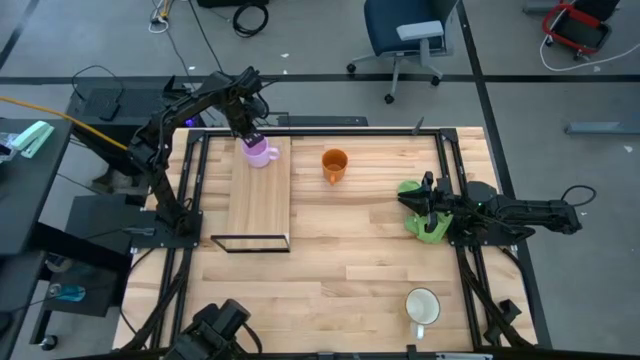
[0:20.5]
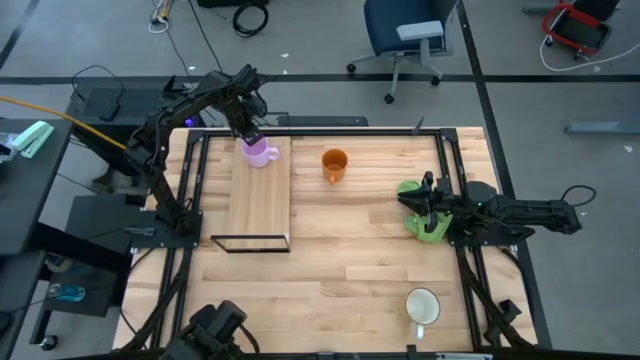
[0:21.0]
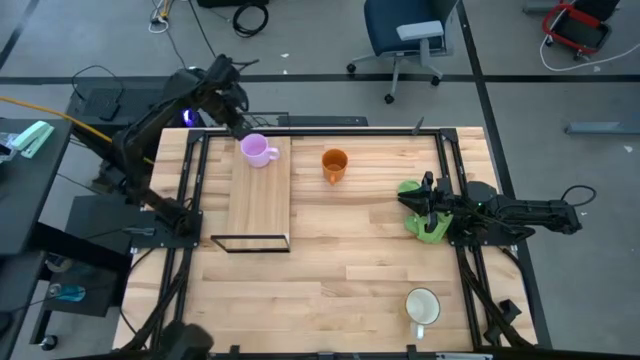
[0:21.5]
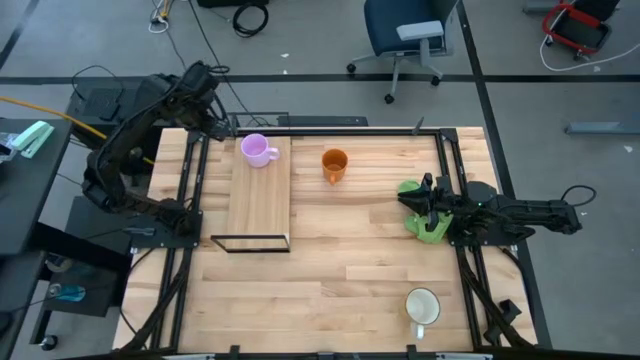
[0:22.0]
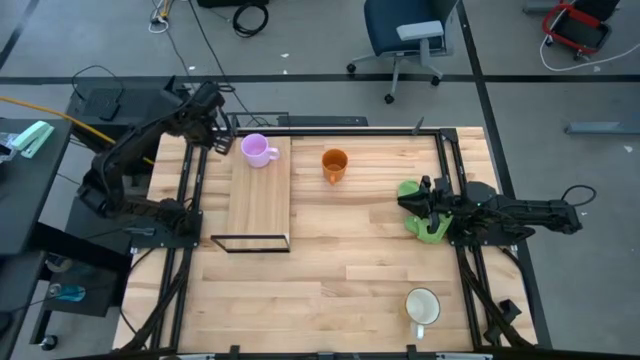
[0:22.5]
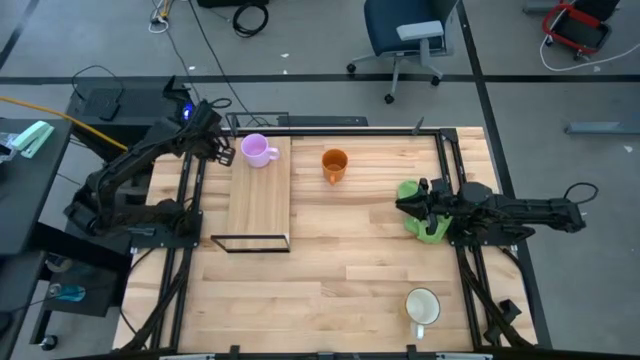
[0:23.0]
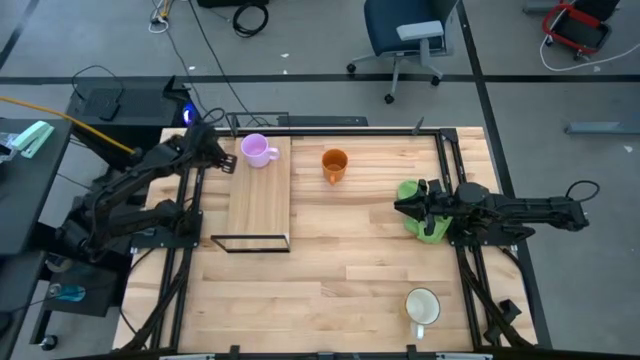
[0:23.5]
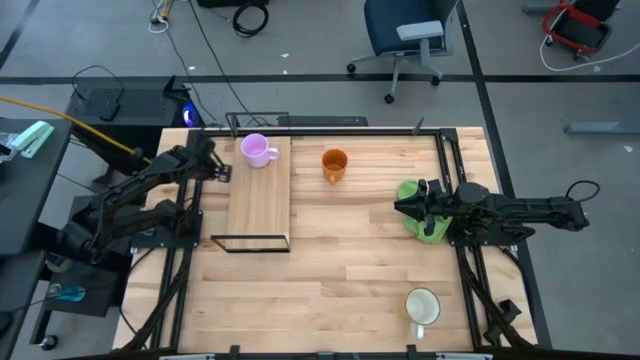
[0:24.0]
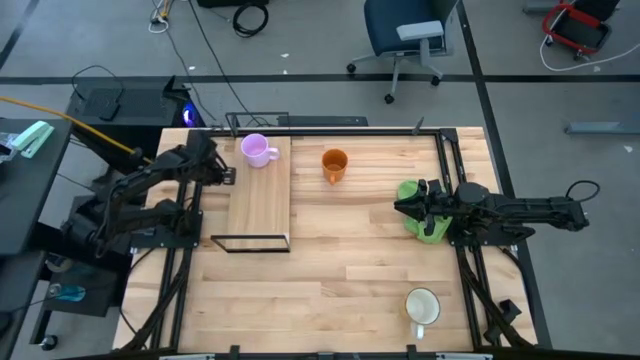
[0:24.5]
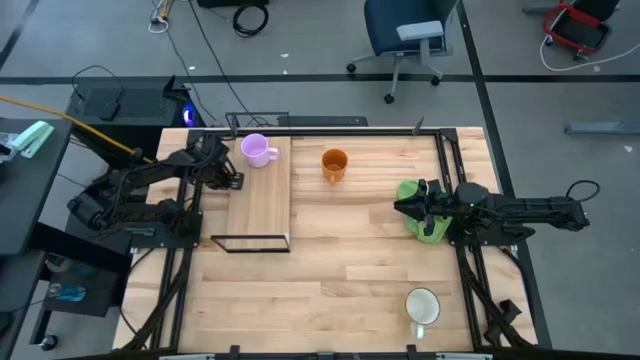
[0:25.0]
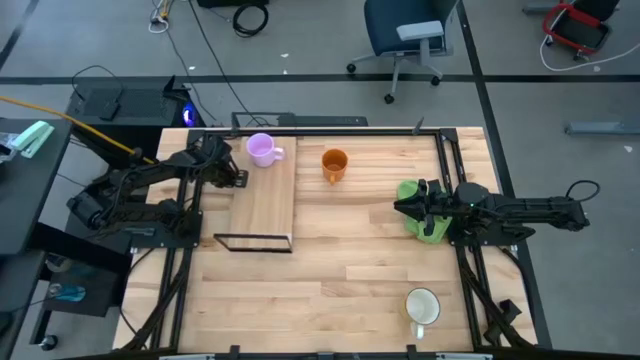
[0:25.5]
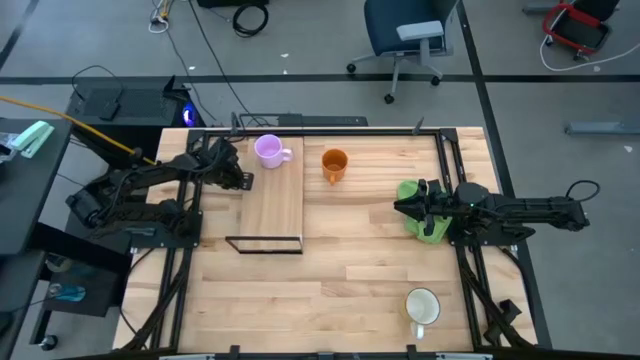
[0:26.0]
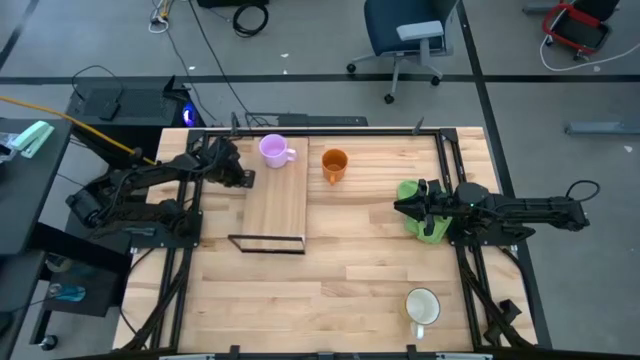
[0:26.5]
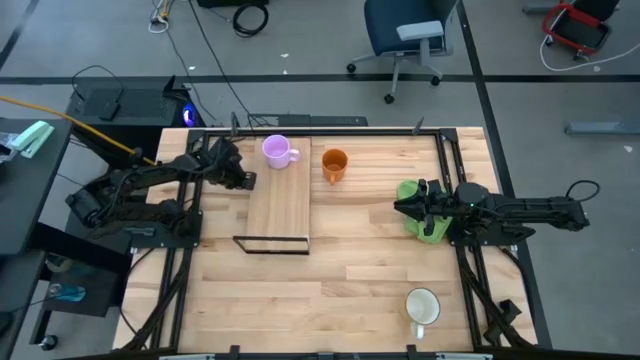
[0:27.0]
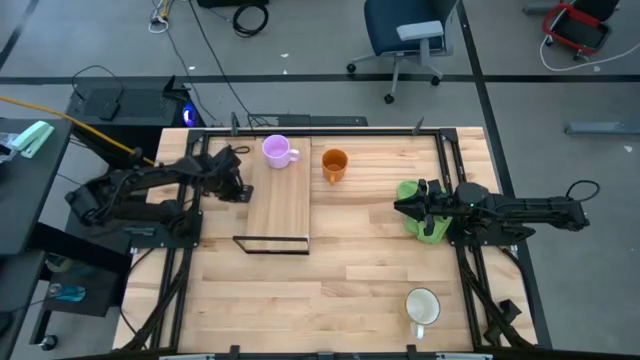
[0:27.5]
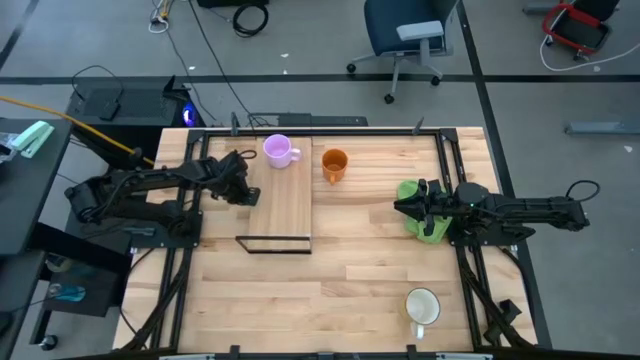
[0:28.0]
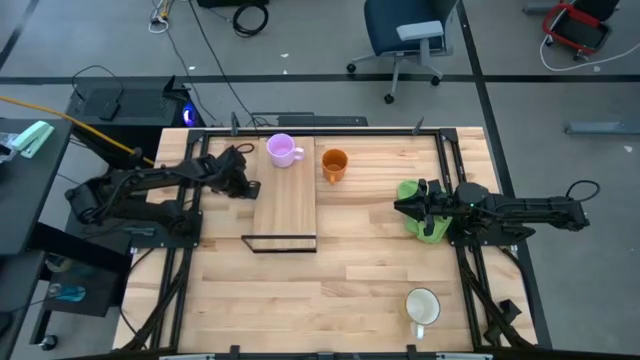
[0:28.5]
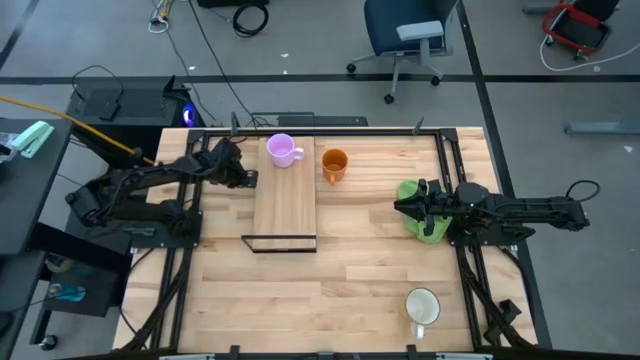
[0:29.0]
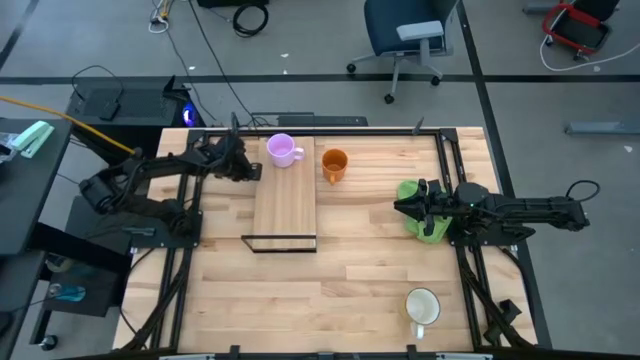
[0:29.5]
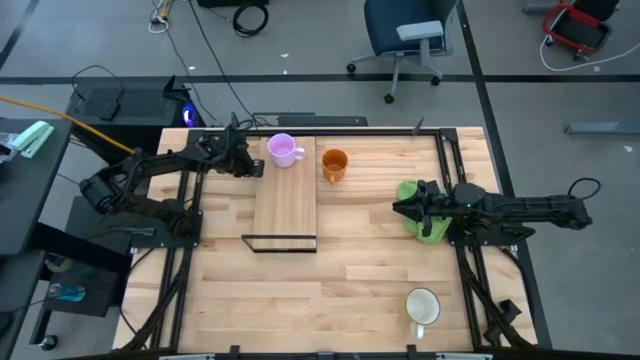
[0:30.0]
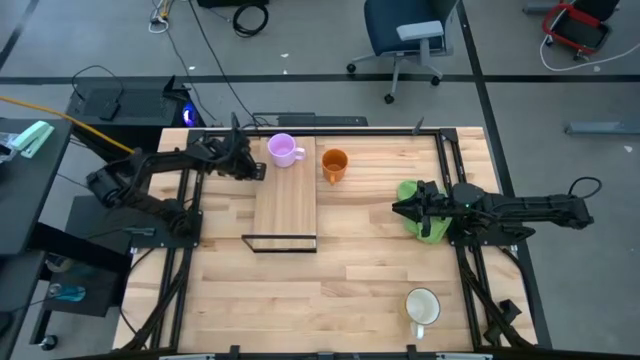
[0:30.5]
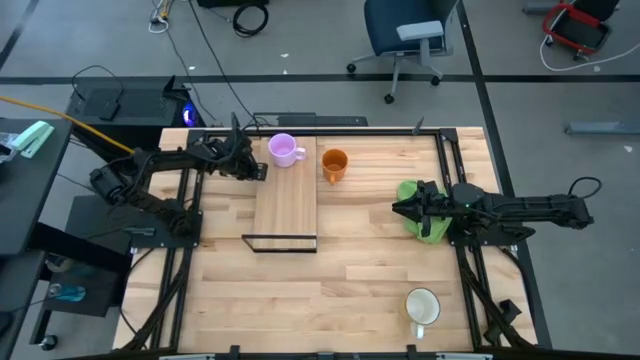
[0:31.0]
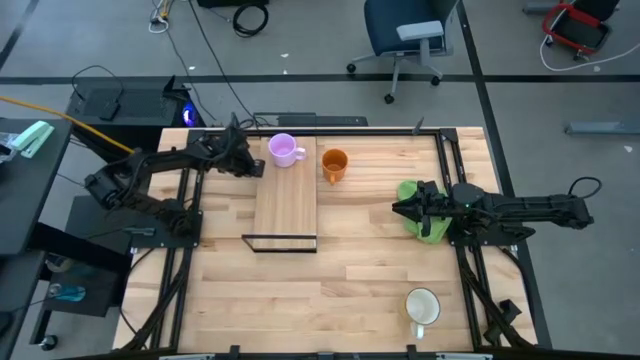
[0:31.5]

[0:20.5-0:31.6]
Task: Stack small to large cups/mugs on shelf
Adjust the shelf

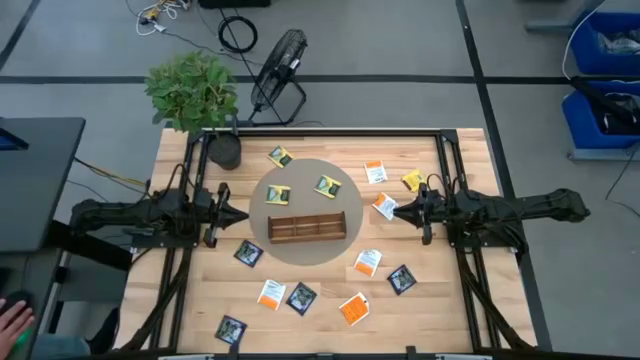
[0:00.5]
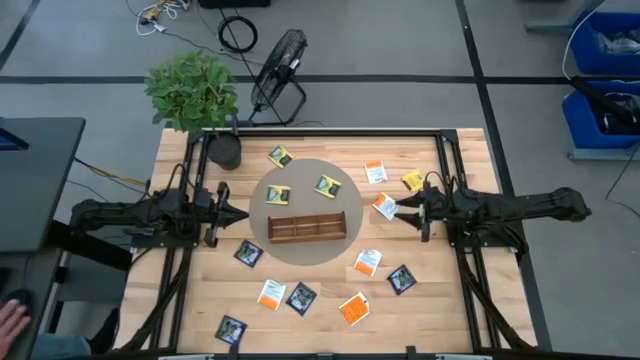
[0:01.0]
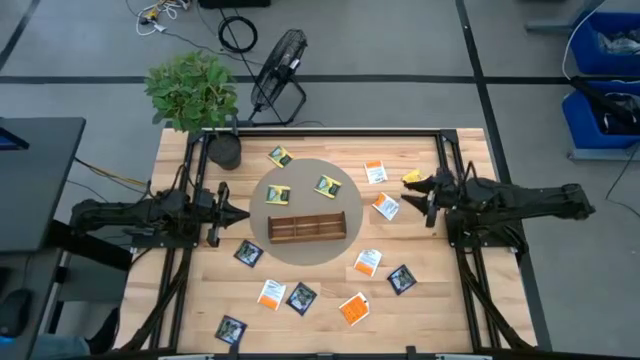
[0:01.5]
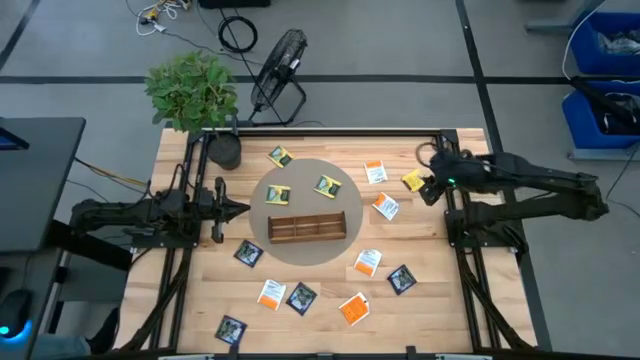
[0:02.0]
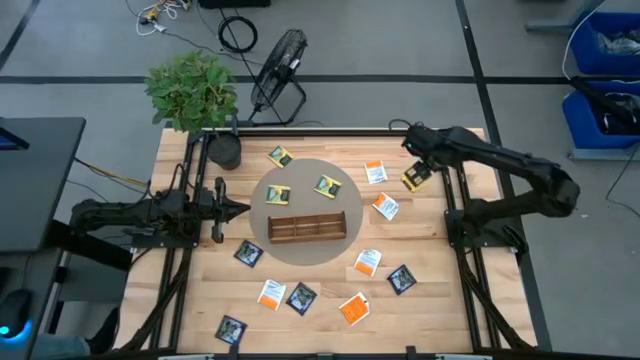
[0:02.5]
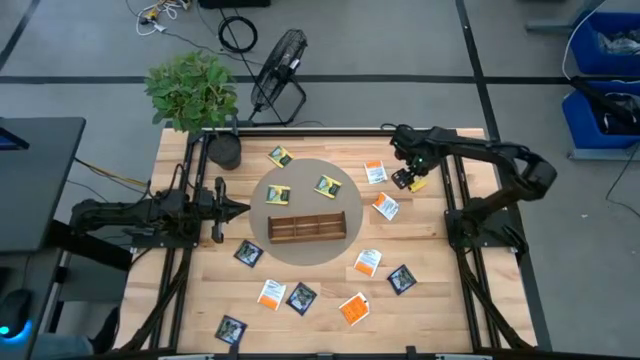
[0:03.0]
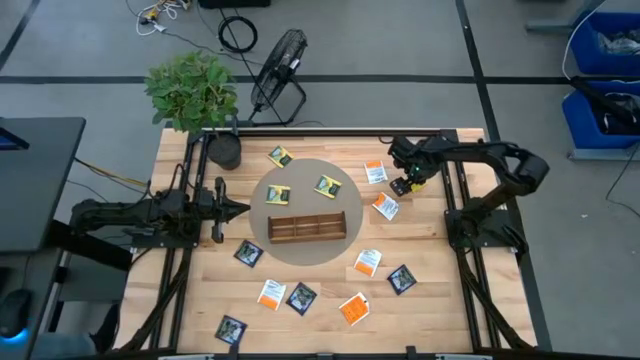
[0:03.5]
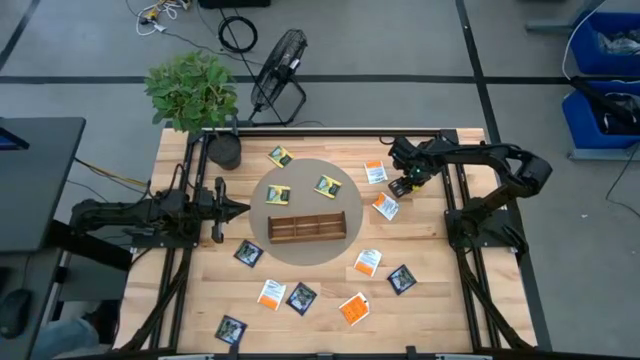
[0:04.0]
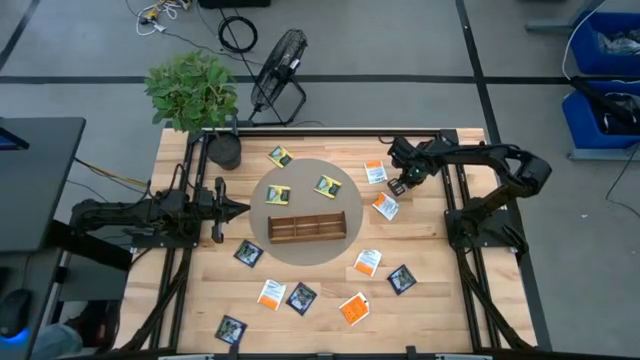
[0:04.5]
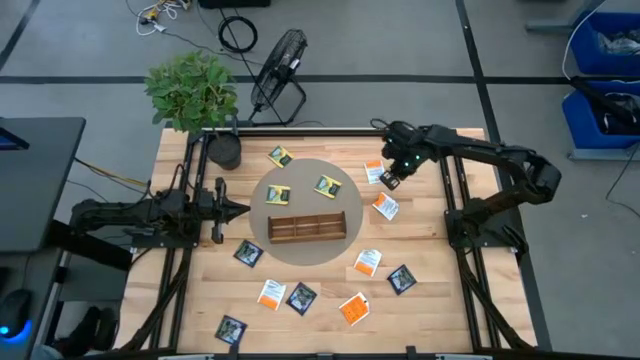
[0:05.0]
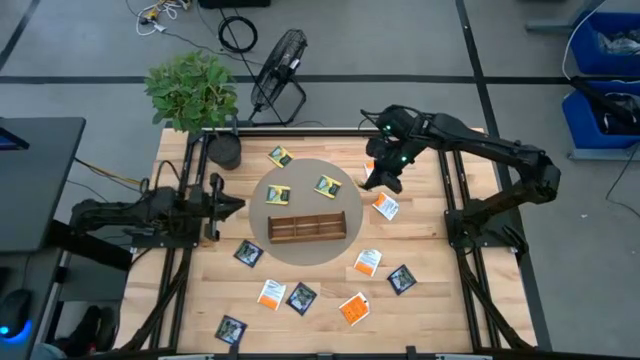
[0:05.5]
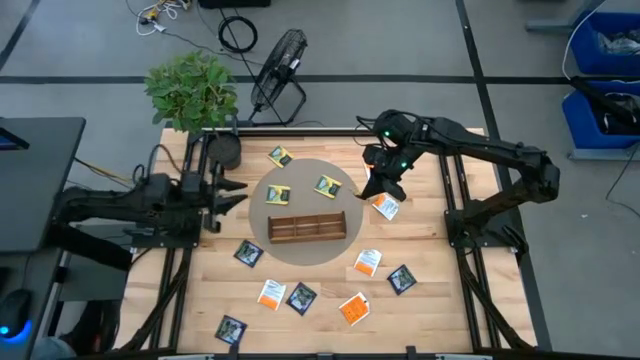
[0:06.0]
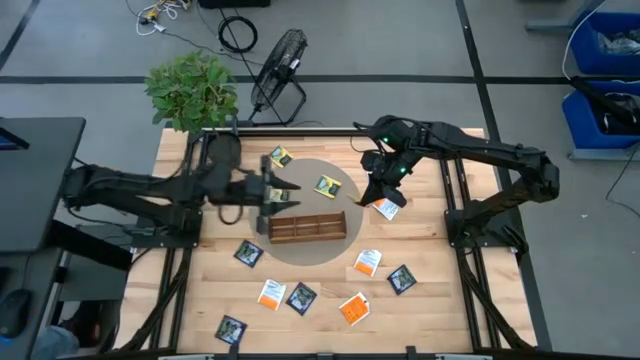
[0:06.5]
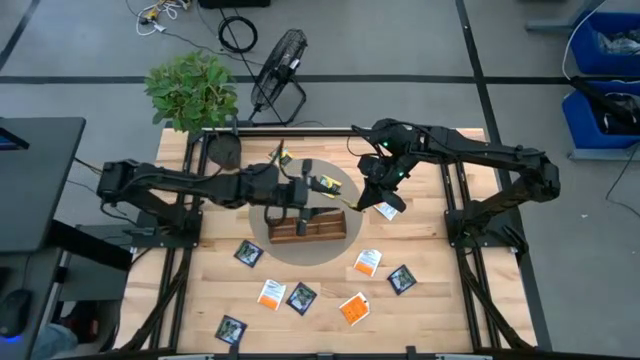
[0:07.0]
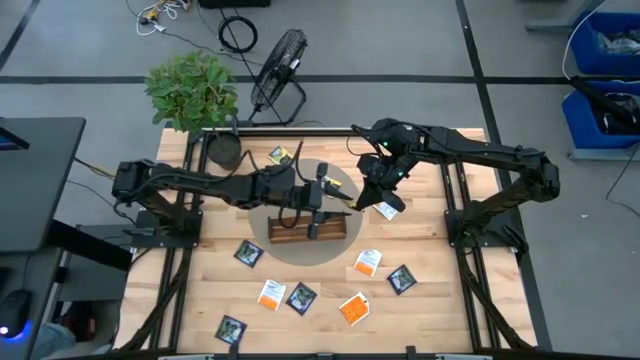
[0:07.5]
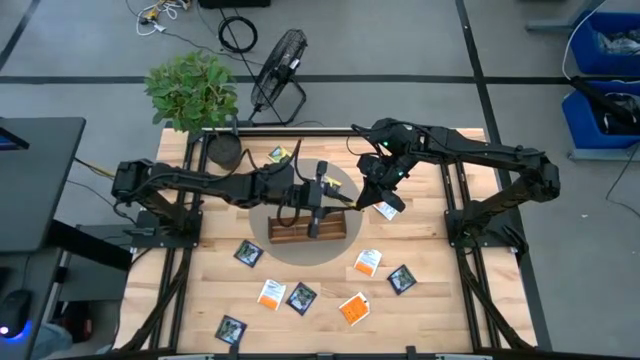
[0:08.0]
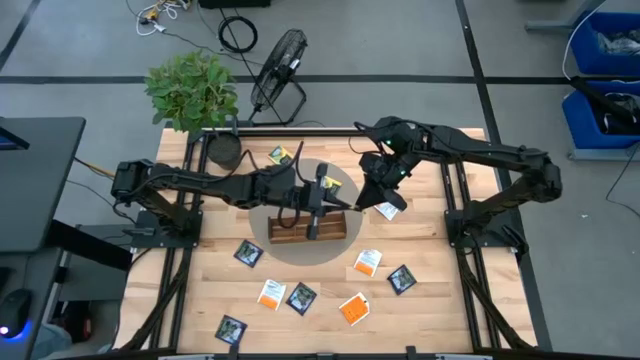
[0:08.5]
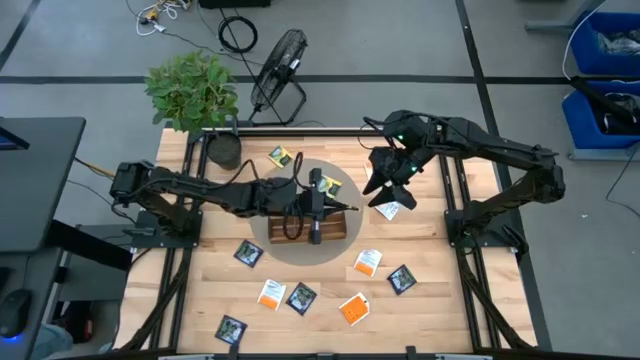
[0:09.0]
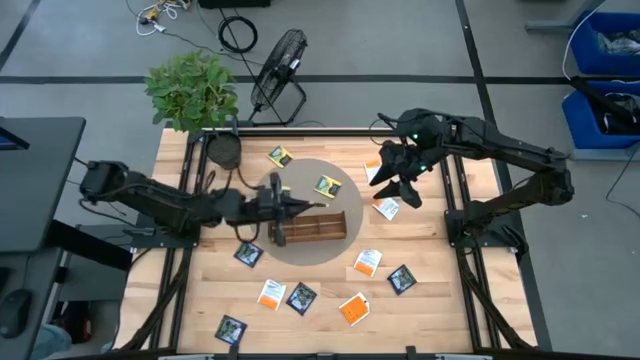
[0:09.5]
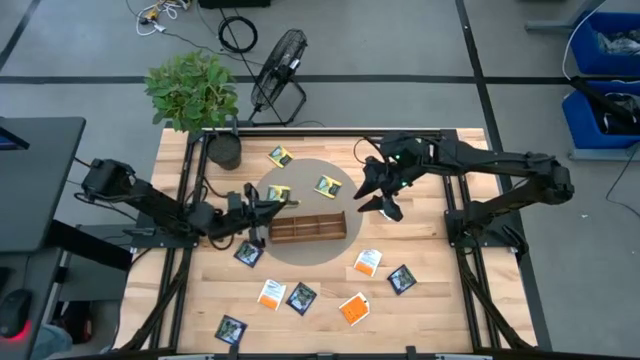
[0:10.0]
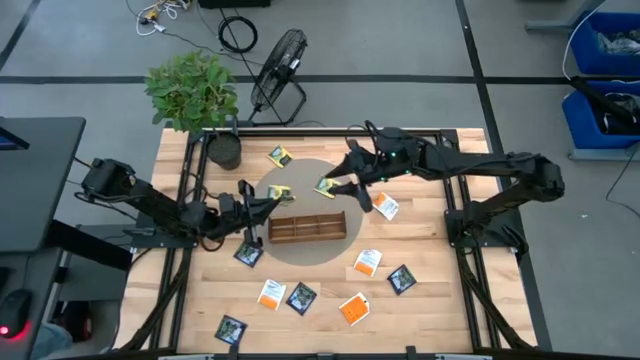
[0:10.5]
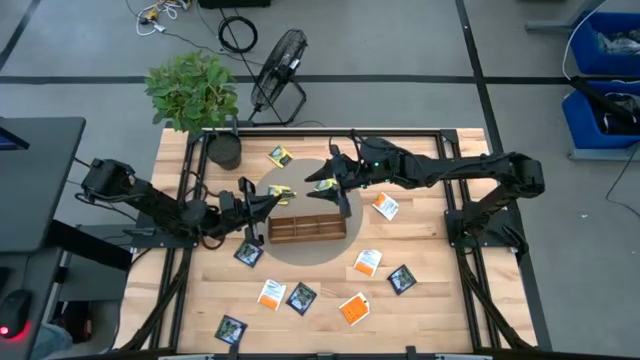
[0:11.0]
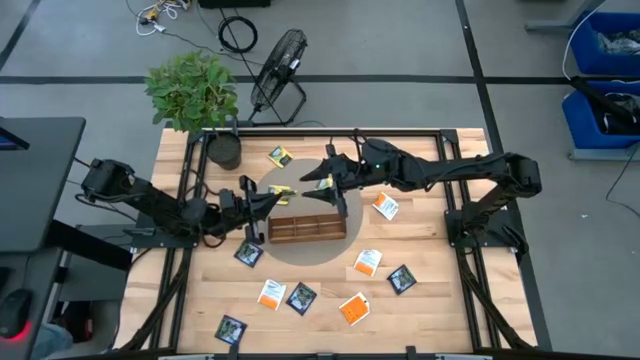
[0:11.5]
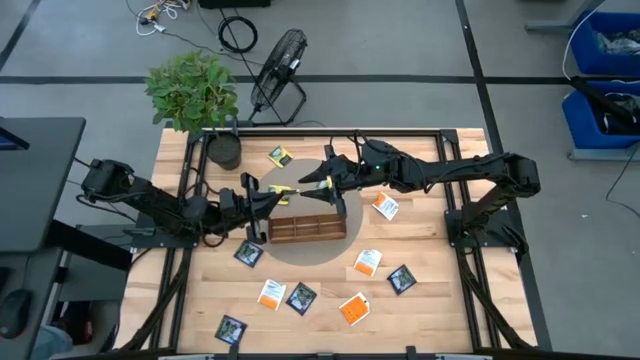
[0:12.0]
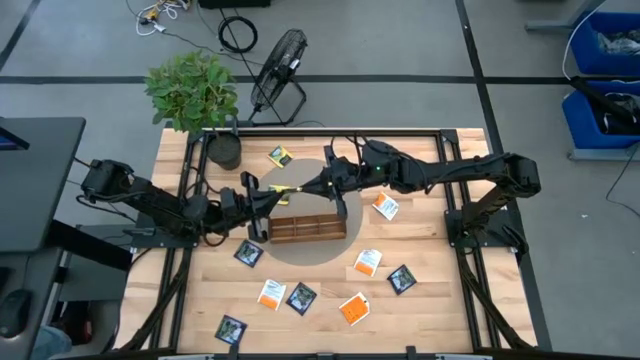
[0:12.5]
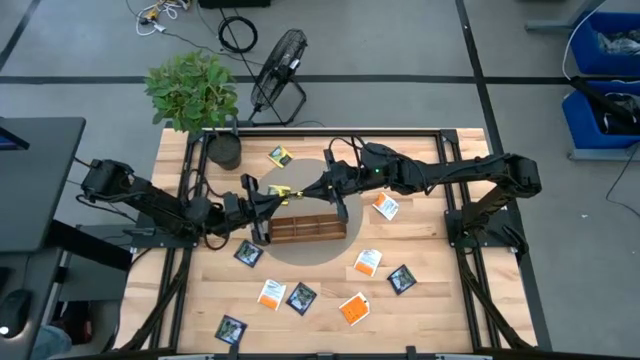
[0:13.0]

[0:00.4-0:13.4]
Task: Pick & Place Tea
Put the yellow tea bag into the left section of the wooden organizer
